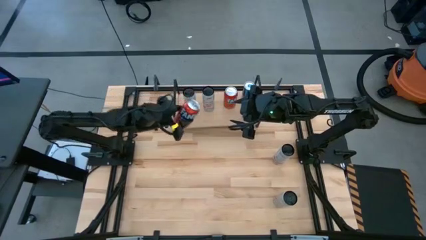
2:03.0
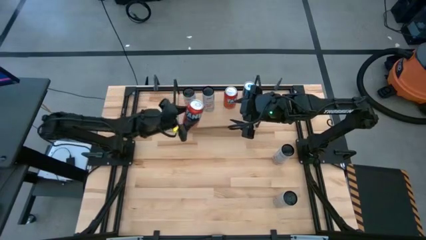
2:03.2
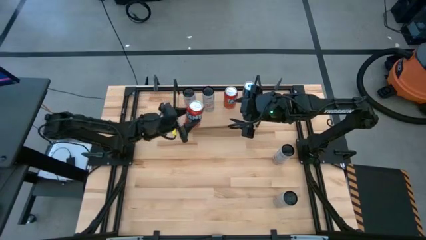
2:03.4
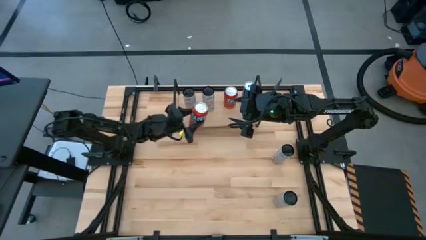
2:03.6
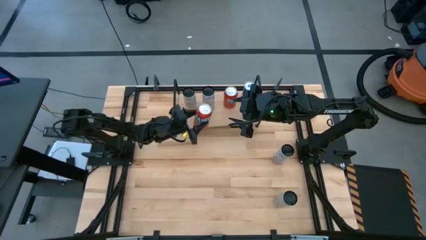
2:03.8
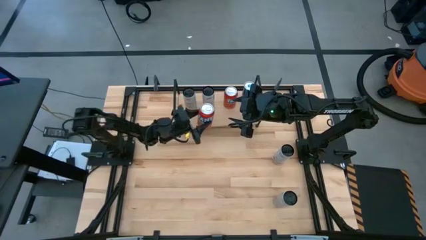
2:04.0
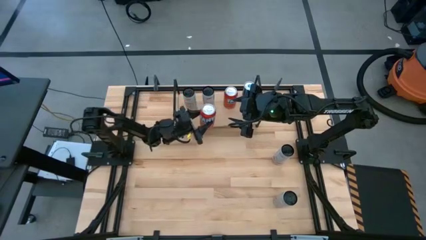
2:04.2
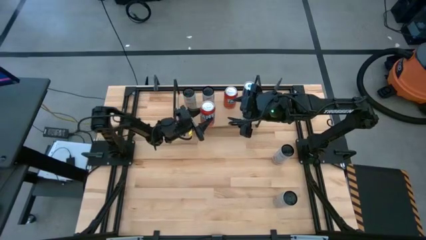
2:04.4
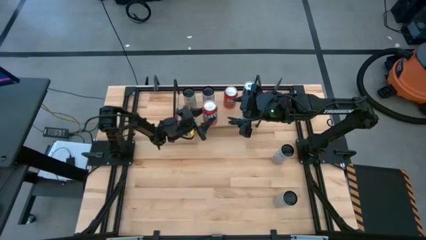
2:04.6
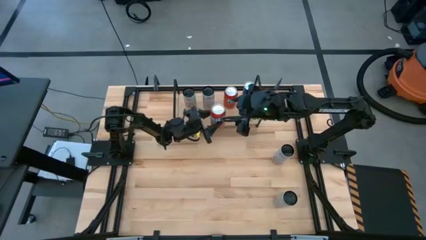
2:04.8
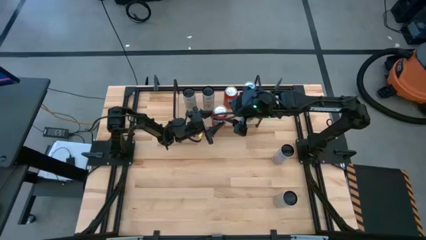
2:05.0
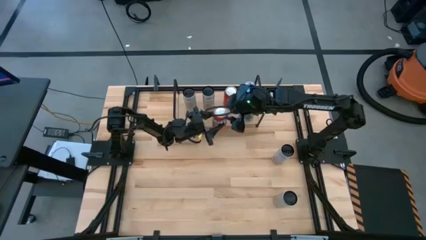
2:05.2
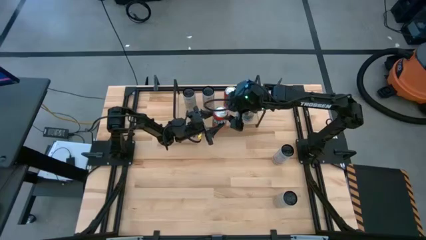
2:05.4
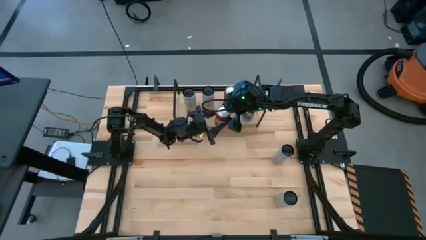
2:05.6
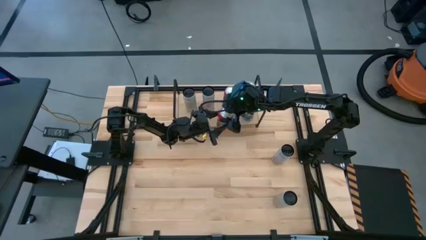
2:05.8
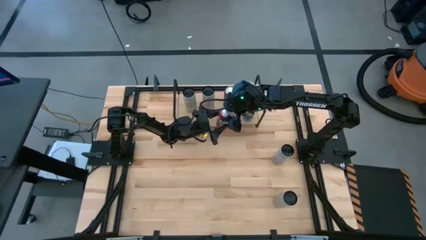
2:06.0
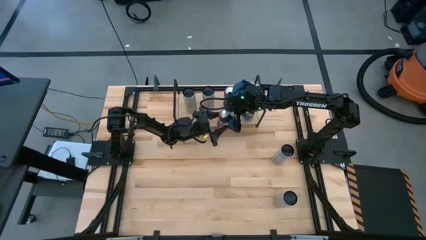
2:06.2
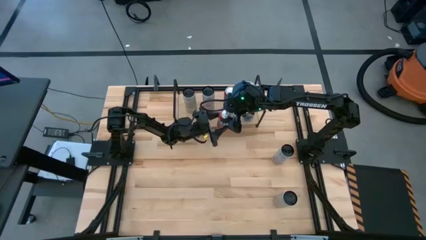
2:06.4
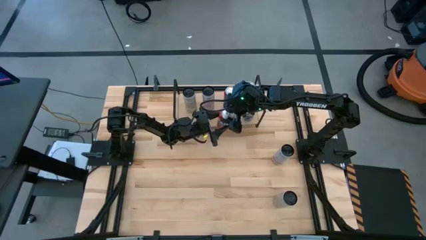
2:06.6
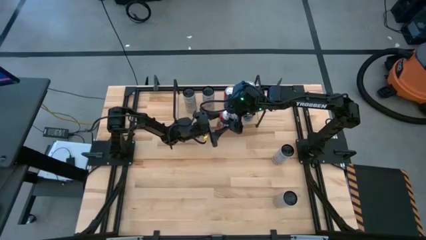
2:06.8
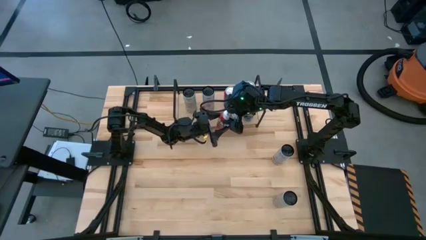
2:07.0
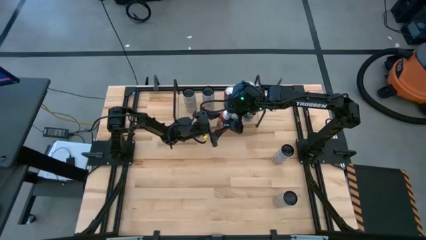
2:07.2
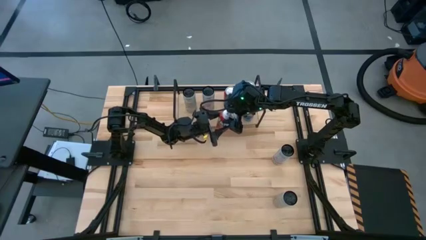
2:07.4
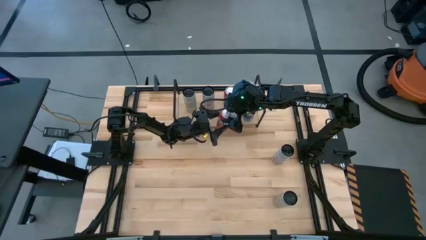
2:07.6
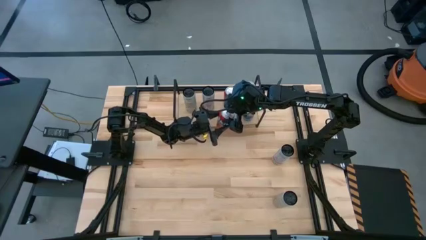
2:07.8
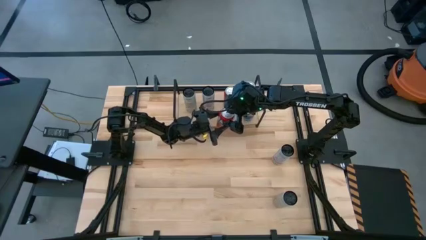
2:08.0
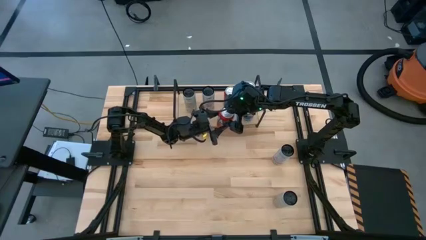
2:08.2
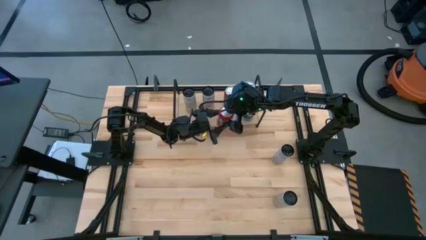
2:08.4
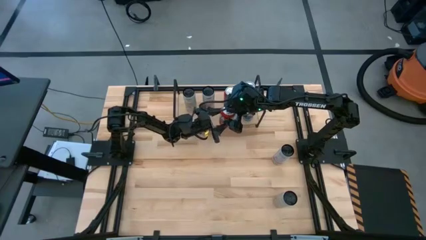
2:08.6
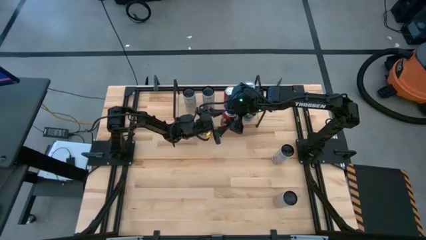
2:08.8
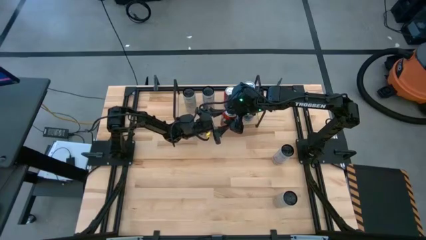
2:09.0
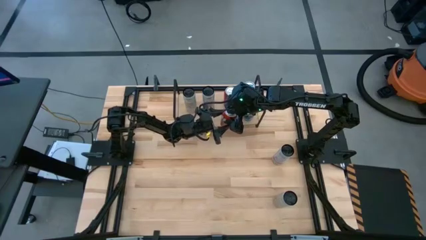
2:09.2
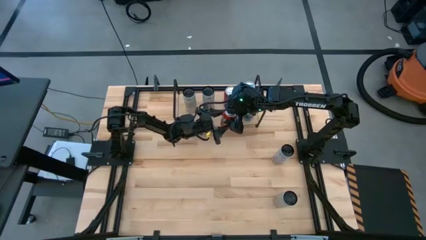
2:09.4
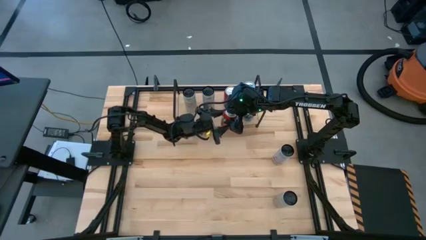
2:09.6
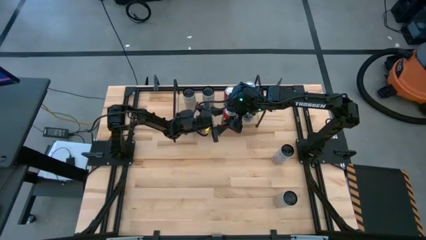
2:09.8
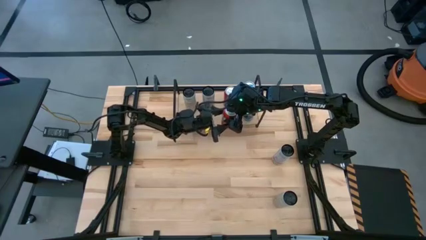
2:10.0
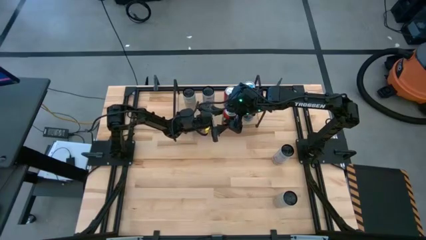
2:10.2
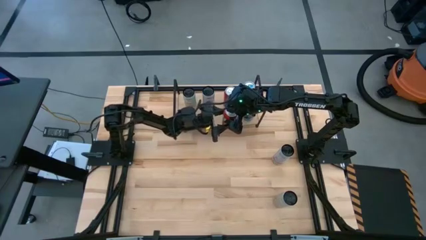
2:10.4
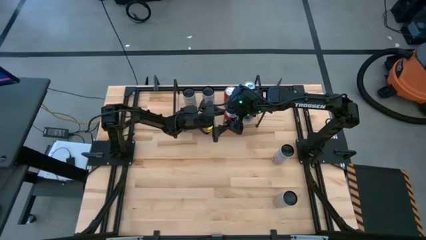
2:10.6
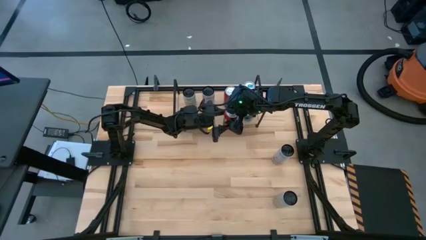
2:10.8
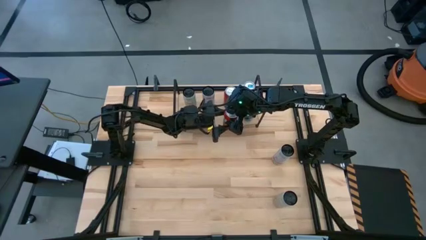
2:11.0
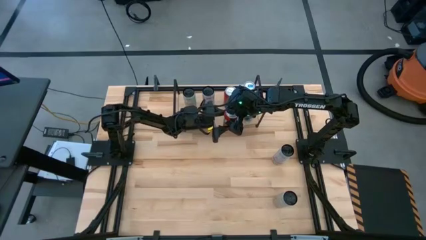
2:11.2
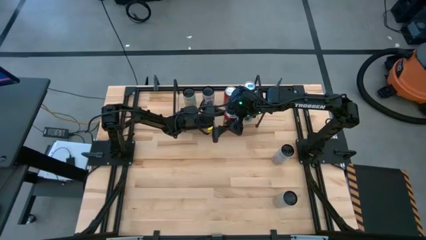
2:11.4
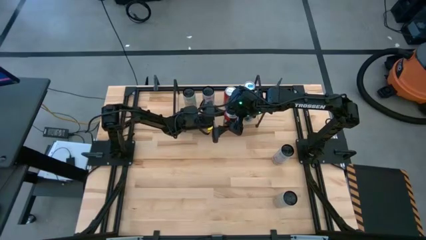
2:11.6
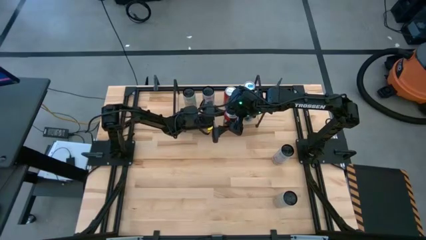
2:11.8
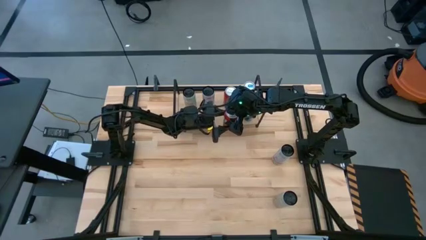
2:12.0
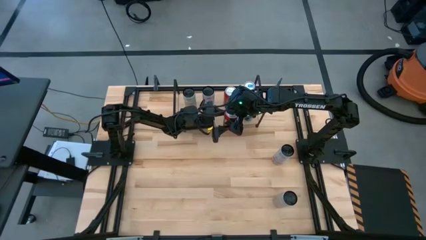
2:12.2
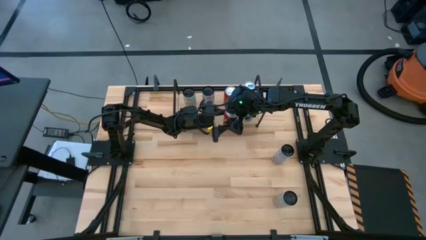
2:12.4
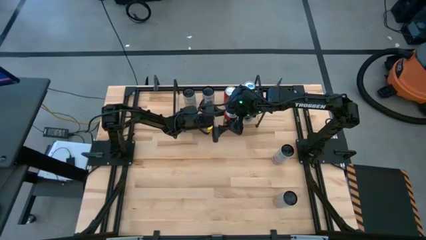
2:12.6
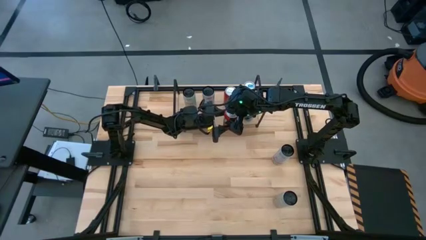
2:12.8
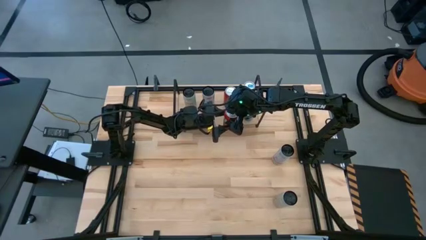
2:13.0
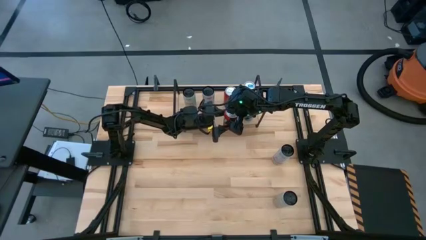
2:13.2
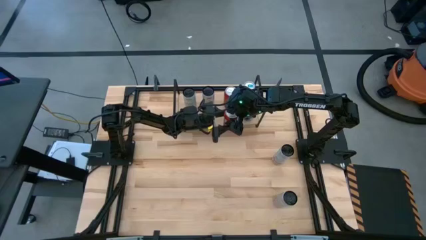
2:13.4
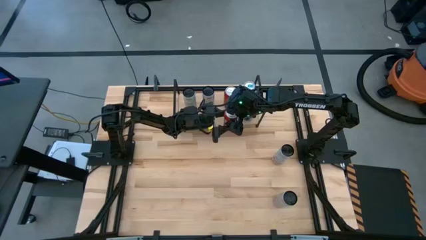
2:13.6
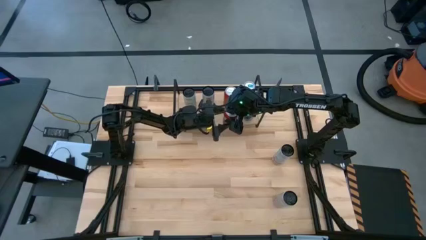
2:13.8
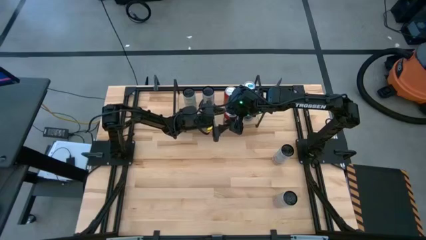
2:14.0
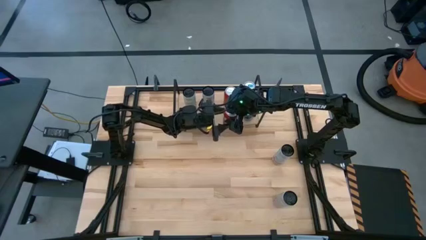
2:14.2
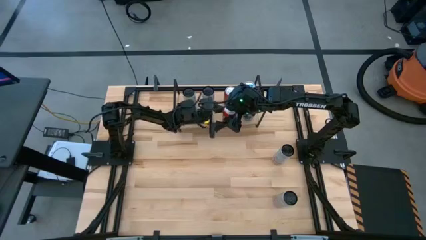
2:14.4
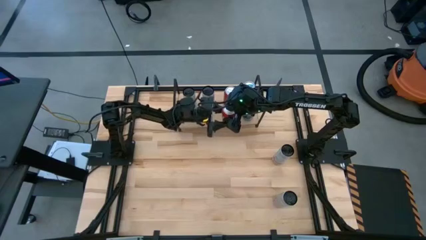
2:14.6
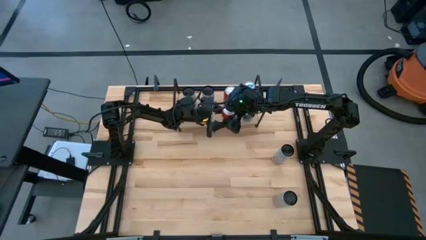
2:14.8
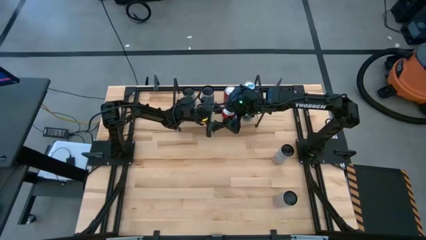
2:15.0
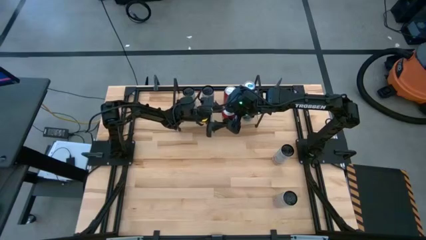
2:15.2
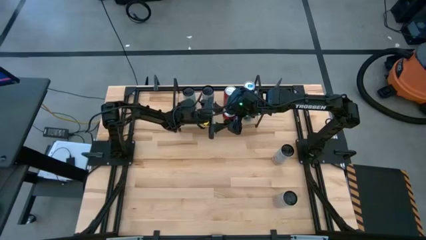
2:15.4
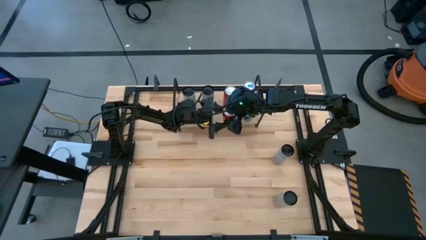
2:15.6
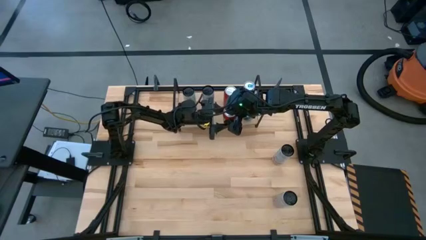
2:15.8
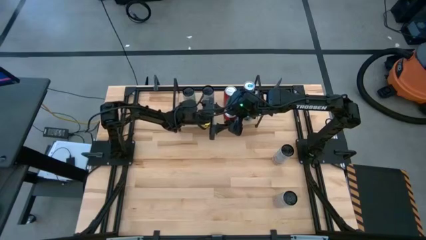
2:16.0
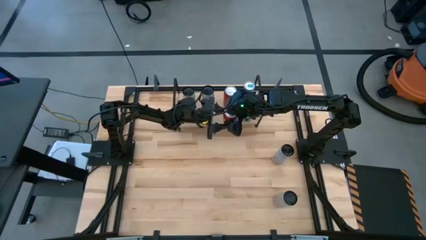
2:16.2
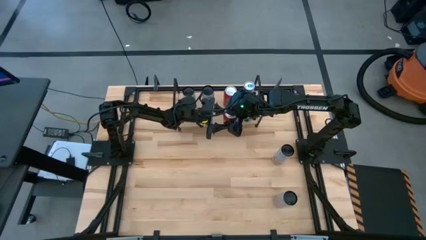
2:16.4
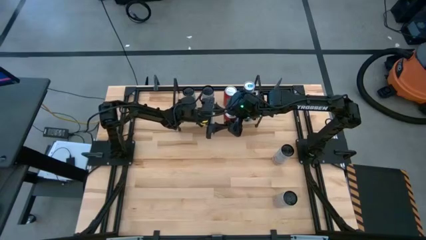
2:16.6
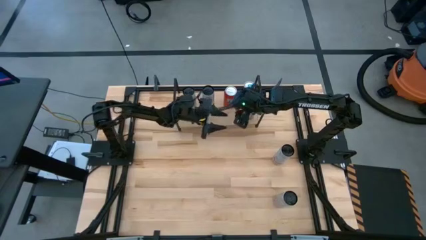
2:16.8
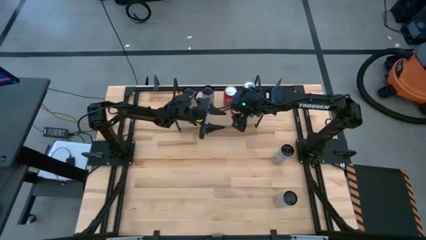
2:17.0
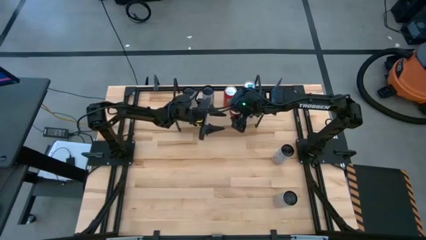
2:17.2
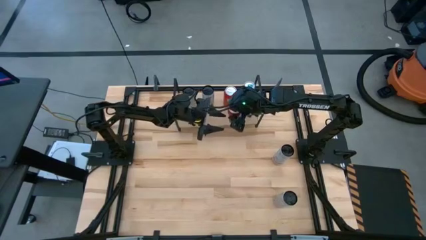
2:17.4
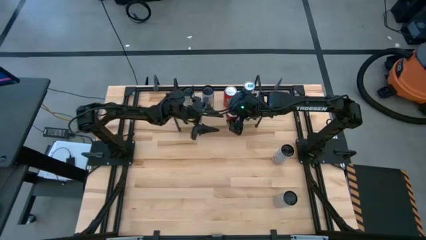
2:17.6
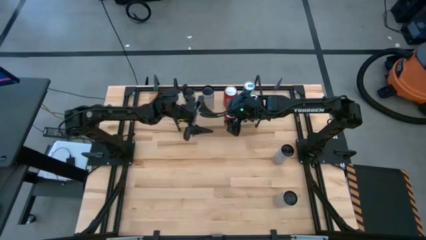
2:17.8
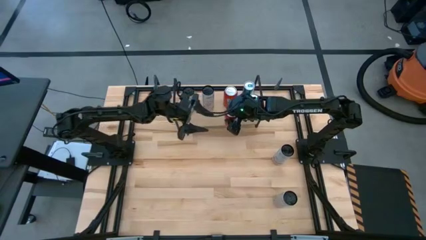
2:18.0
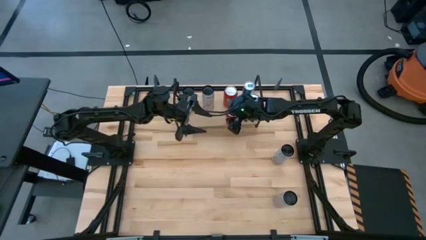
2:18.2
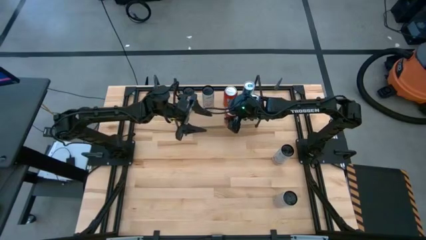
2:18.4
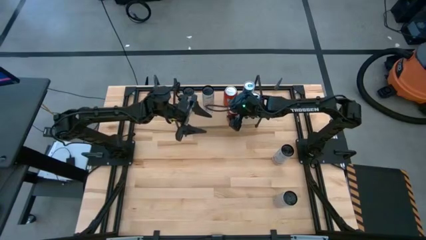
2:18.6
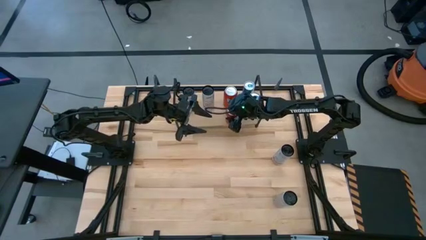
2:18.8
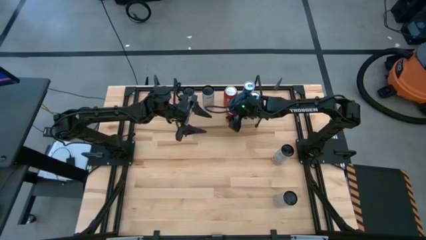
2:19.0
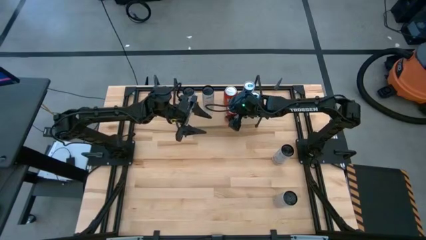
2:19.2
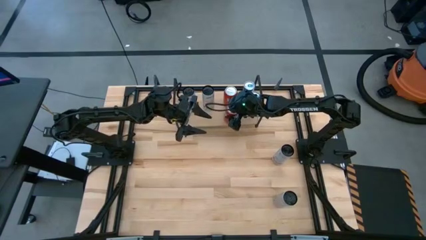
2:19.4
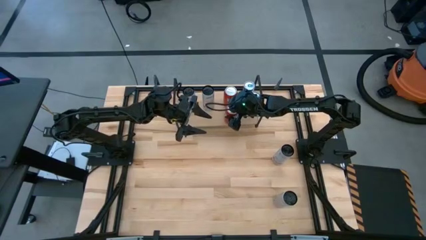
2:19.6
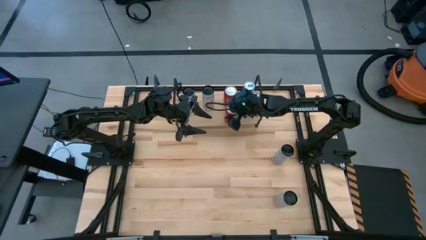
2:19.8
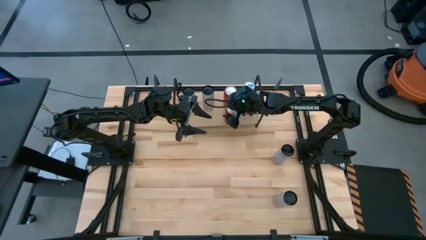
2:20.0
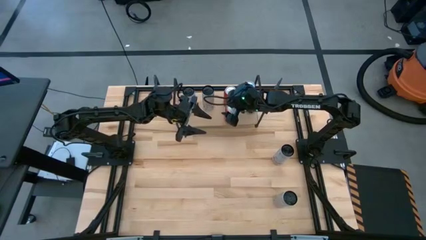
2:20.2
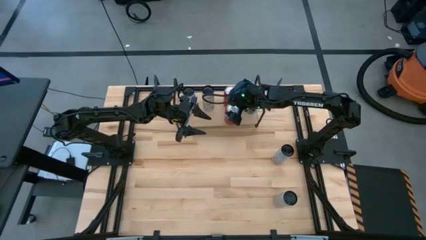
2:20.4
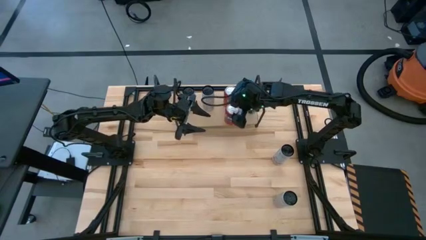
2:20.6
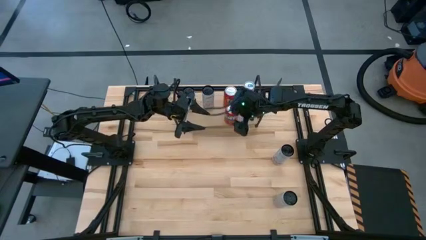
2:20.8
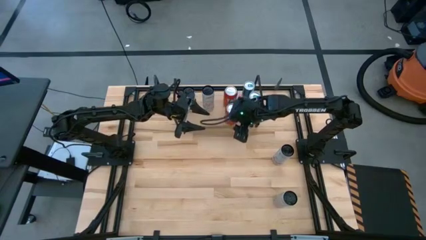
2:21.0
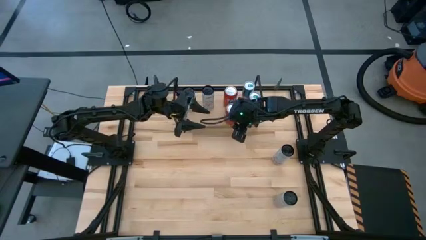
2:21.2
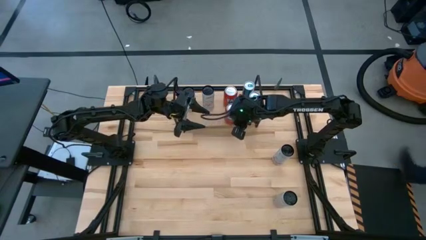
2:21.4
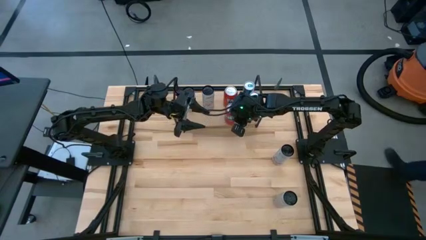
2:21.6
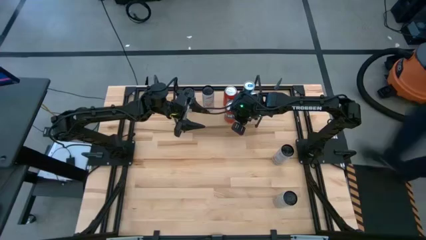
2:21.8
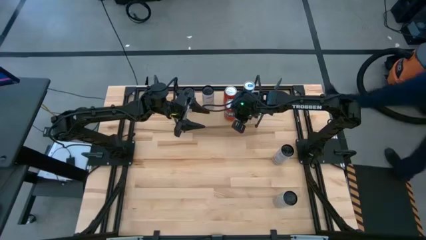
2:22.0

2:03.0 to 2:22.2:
Task: Place canned beverage on shelf
Put the orange soda can aligned with the other orange soda can on the shelf
